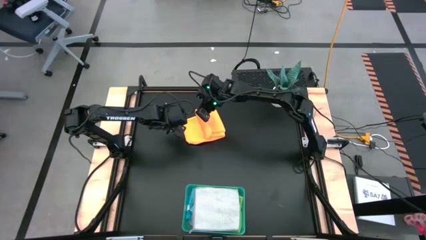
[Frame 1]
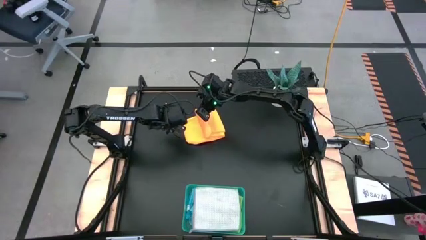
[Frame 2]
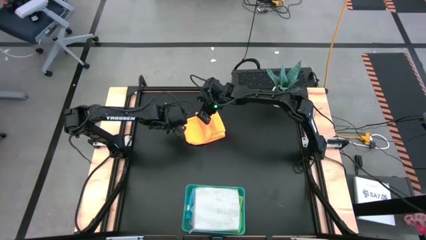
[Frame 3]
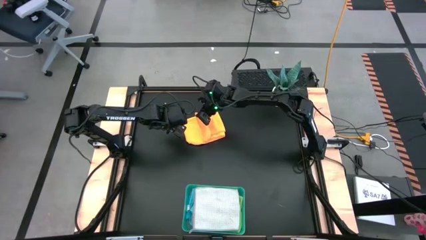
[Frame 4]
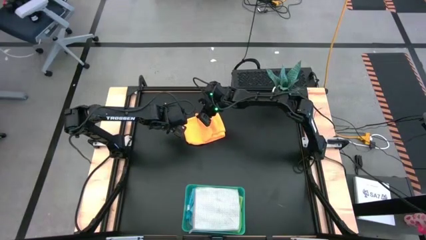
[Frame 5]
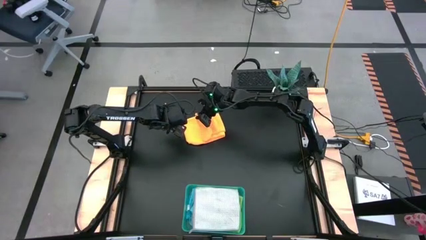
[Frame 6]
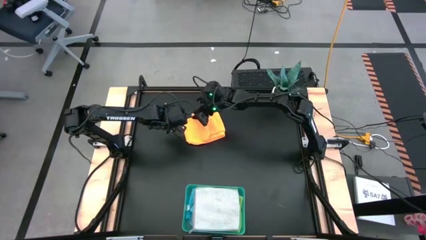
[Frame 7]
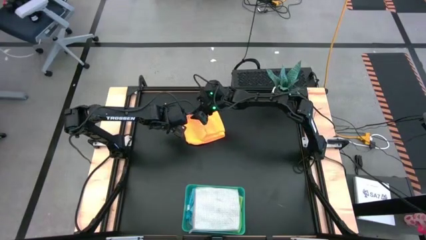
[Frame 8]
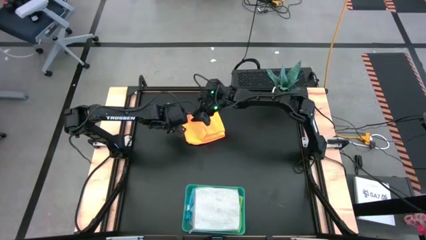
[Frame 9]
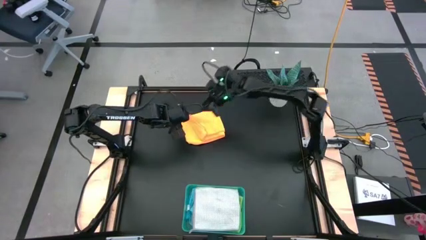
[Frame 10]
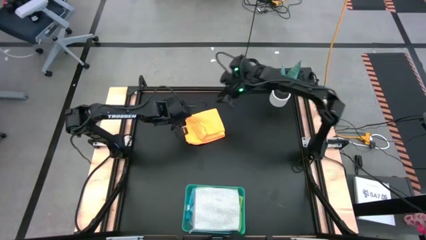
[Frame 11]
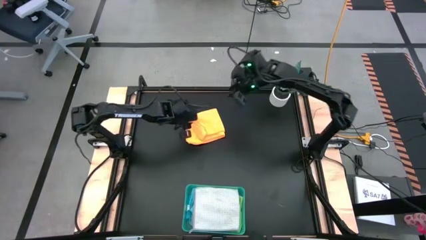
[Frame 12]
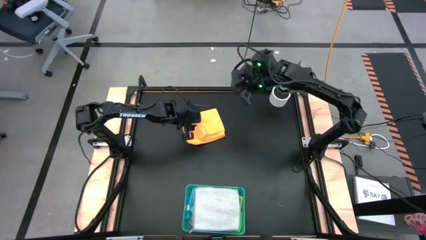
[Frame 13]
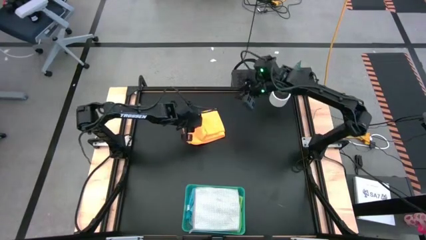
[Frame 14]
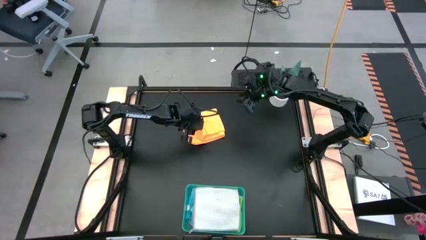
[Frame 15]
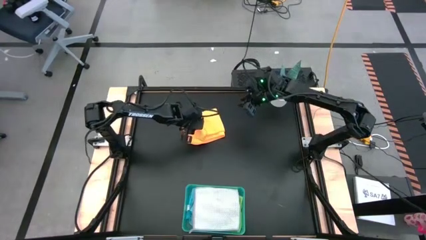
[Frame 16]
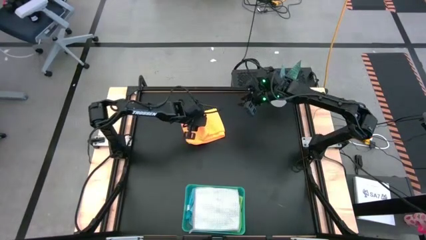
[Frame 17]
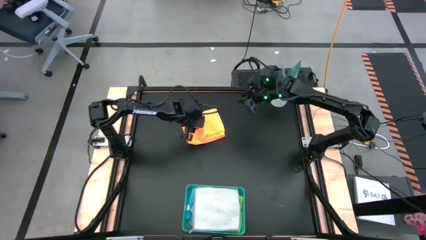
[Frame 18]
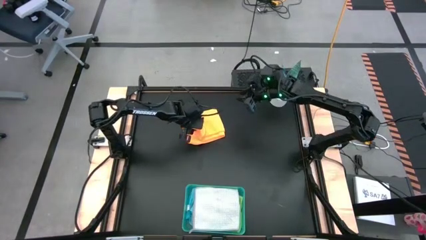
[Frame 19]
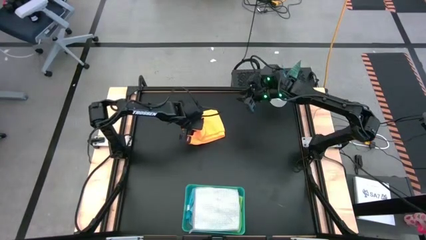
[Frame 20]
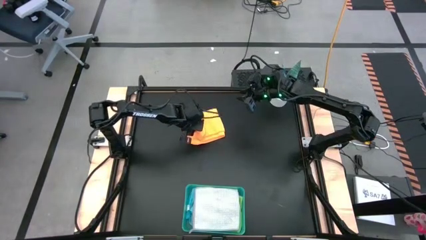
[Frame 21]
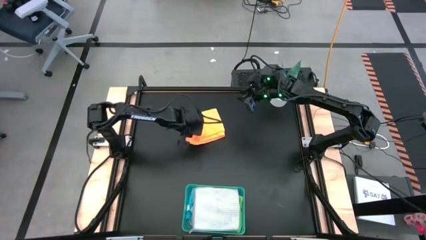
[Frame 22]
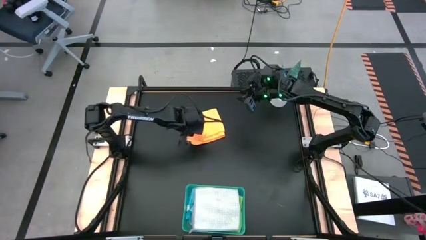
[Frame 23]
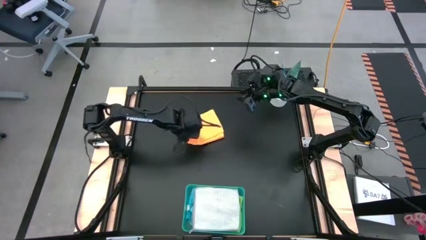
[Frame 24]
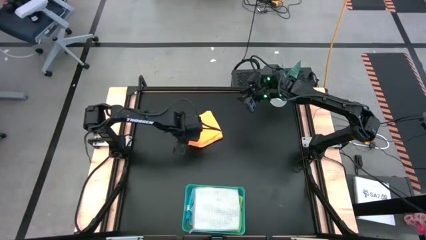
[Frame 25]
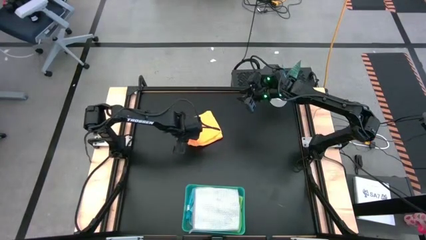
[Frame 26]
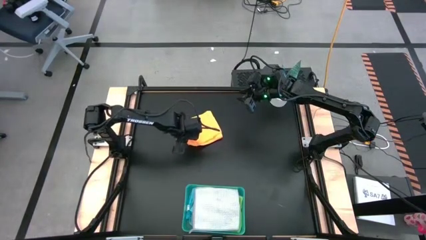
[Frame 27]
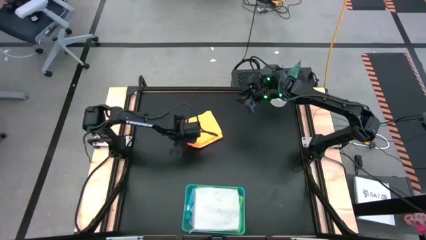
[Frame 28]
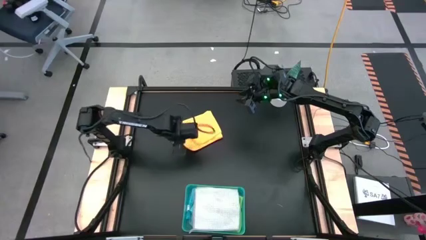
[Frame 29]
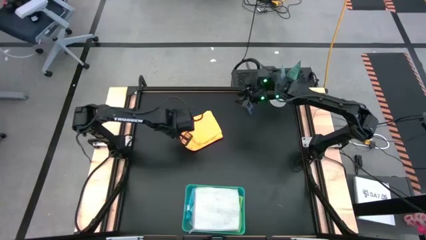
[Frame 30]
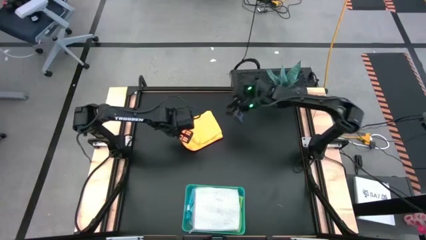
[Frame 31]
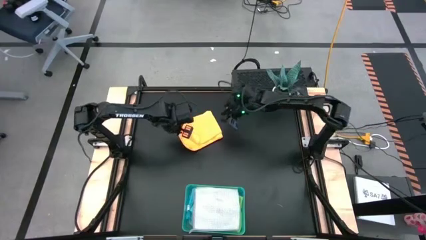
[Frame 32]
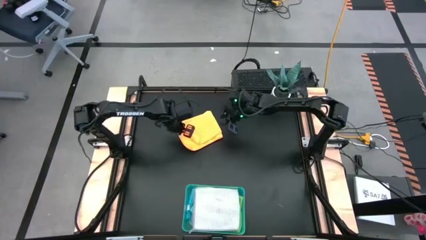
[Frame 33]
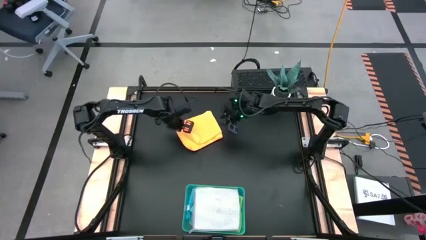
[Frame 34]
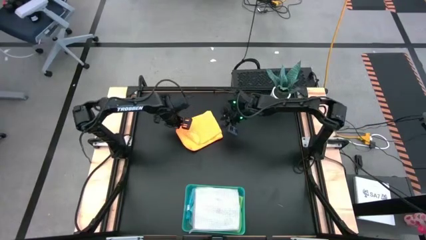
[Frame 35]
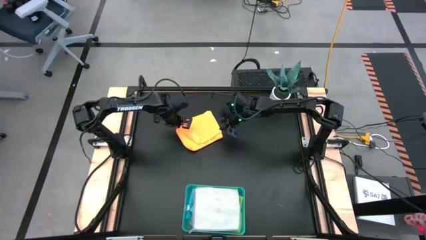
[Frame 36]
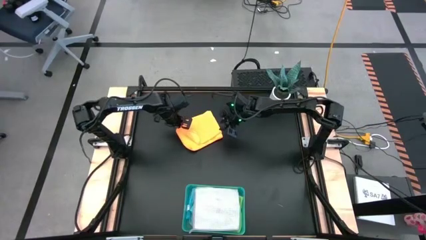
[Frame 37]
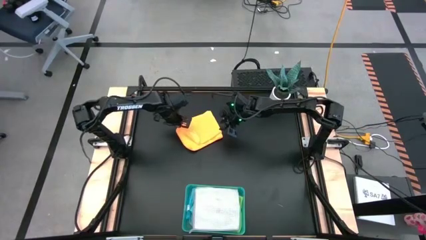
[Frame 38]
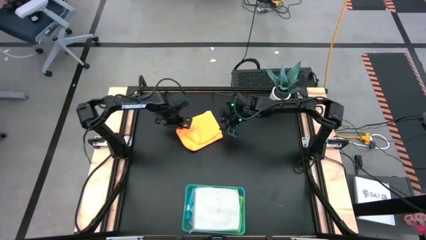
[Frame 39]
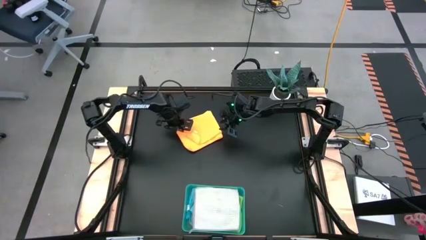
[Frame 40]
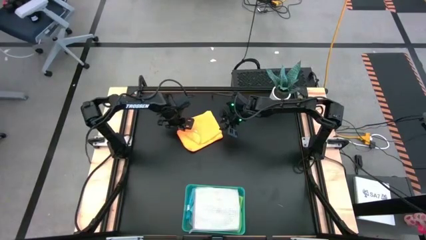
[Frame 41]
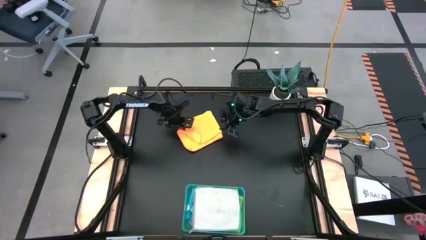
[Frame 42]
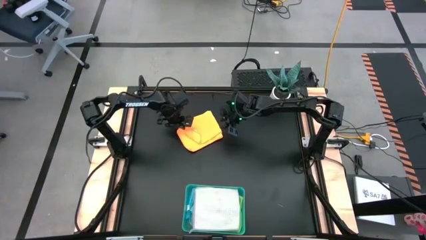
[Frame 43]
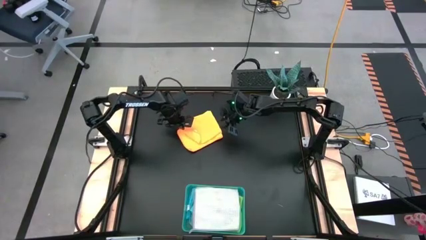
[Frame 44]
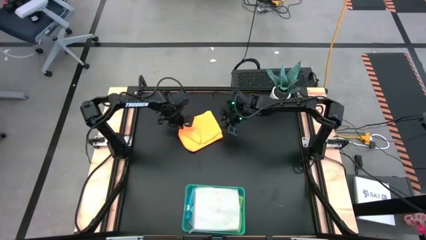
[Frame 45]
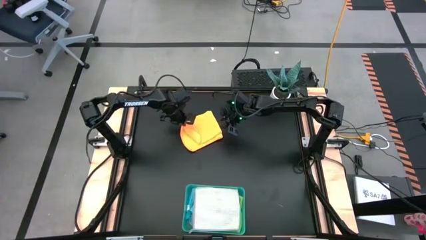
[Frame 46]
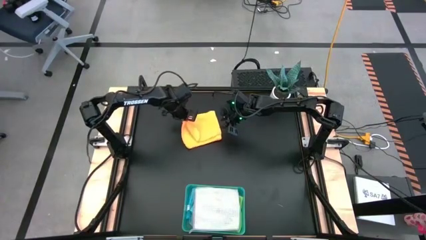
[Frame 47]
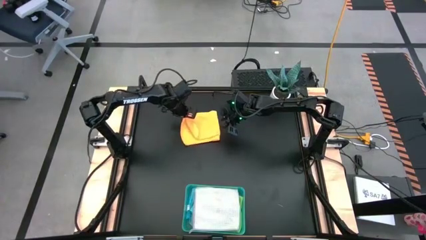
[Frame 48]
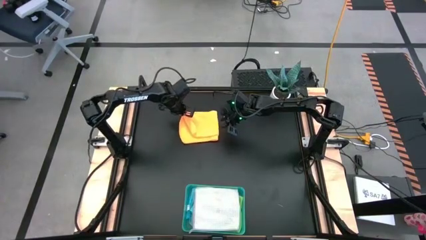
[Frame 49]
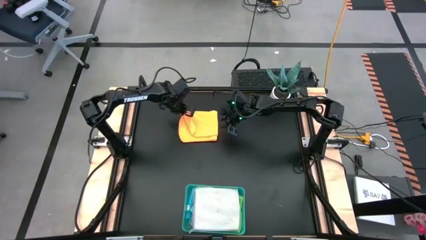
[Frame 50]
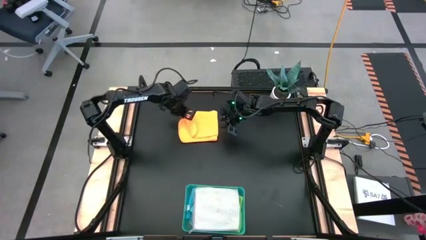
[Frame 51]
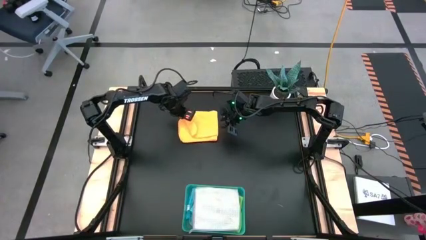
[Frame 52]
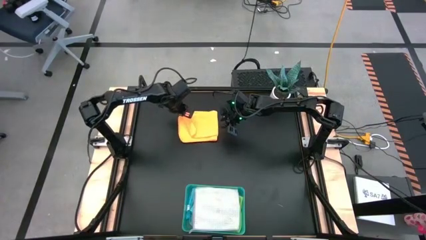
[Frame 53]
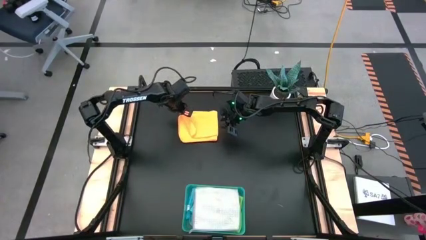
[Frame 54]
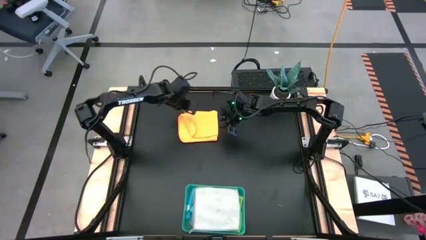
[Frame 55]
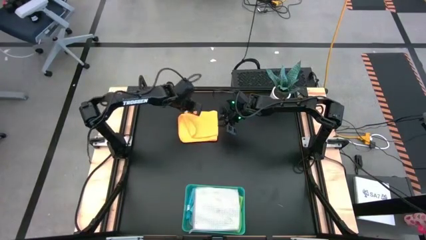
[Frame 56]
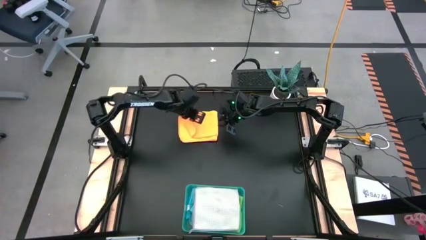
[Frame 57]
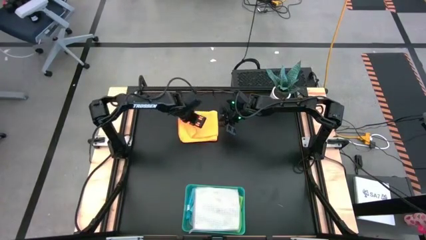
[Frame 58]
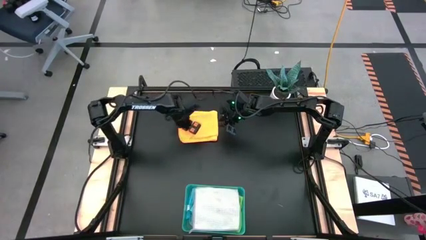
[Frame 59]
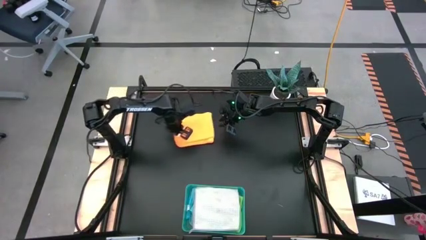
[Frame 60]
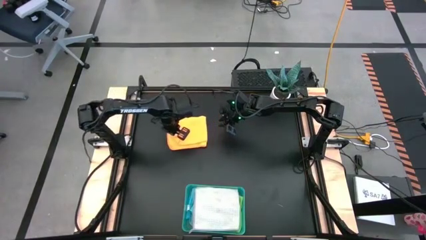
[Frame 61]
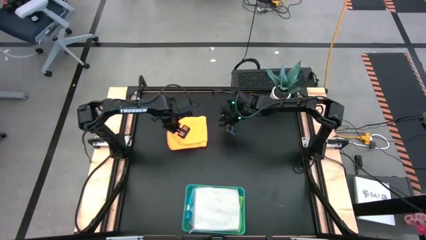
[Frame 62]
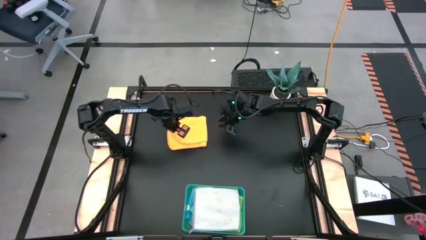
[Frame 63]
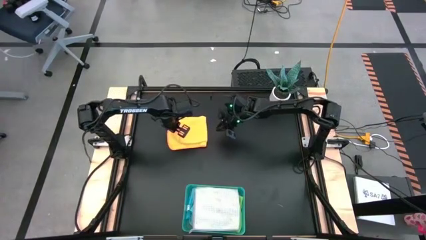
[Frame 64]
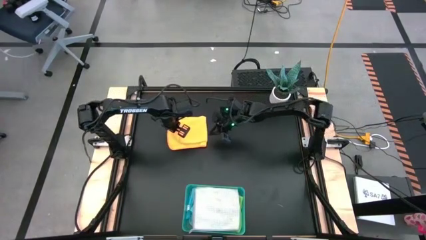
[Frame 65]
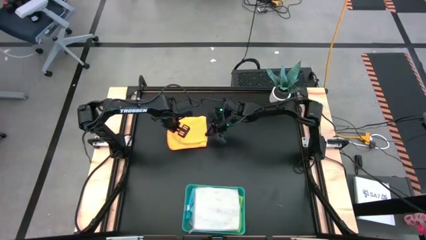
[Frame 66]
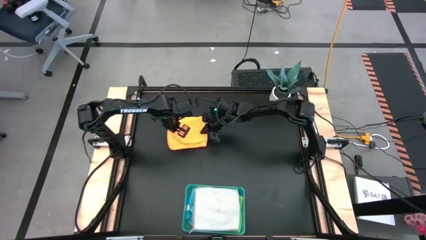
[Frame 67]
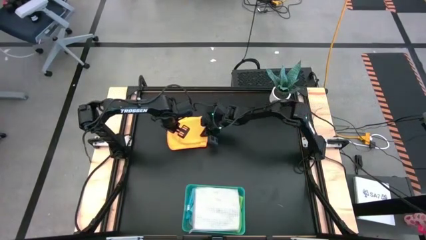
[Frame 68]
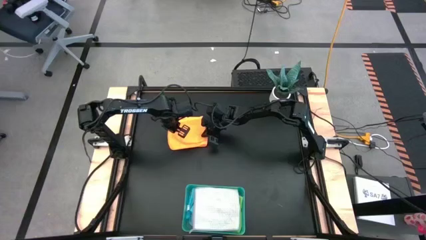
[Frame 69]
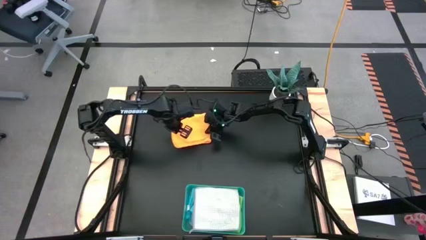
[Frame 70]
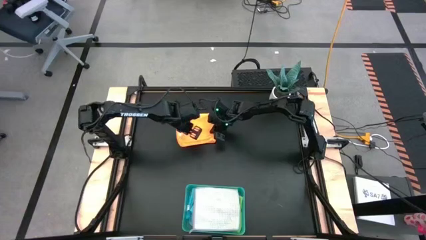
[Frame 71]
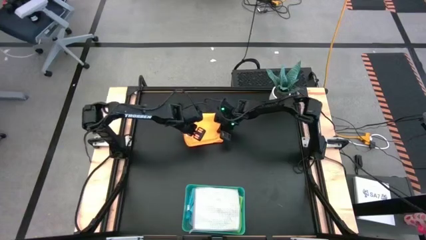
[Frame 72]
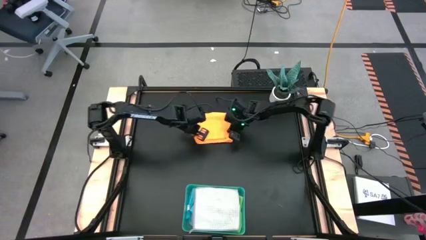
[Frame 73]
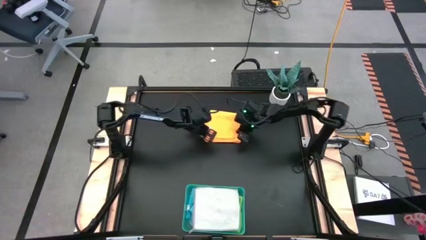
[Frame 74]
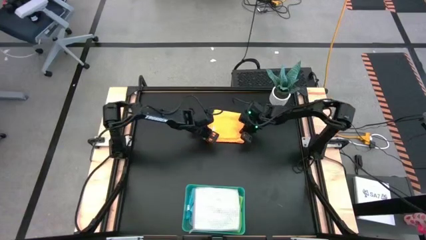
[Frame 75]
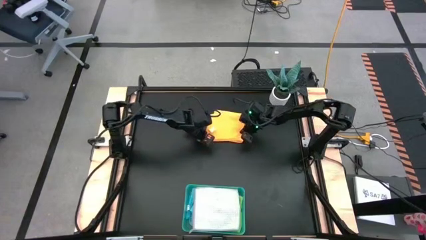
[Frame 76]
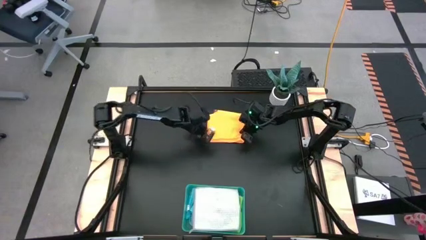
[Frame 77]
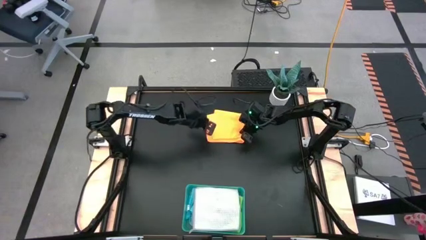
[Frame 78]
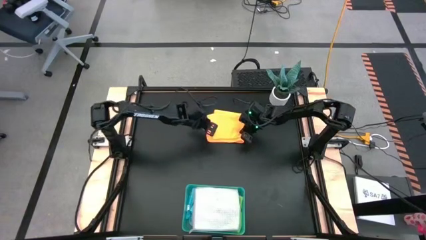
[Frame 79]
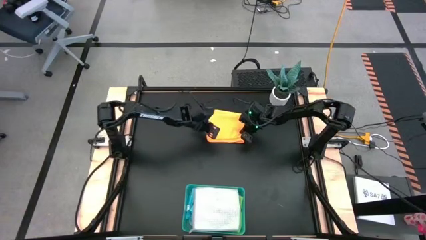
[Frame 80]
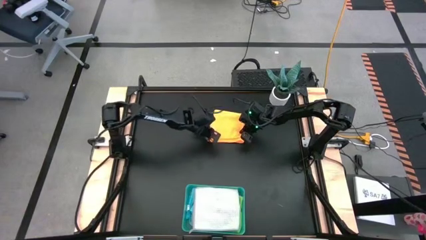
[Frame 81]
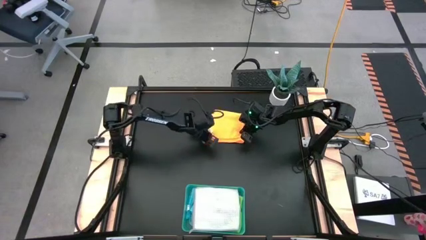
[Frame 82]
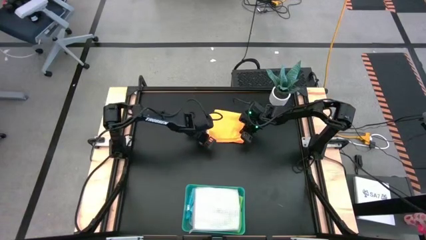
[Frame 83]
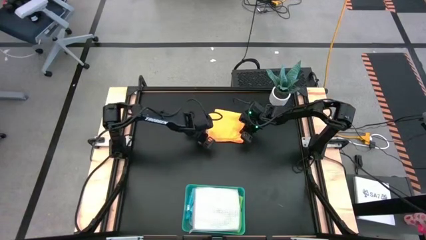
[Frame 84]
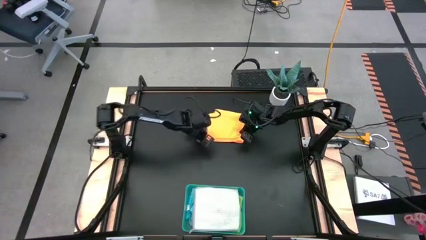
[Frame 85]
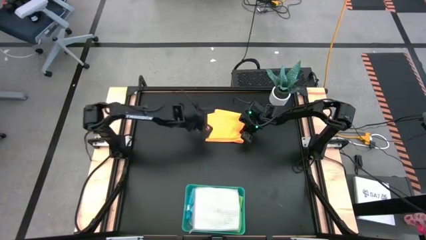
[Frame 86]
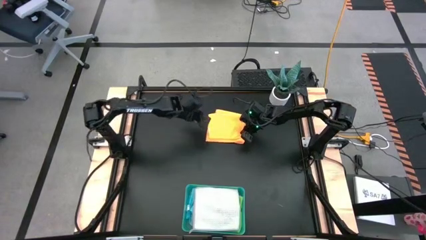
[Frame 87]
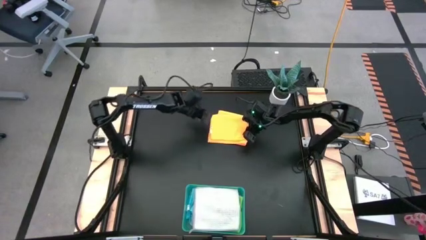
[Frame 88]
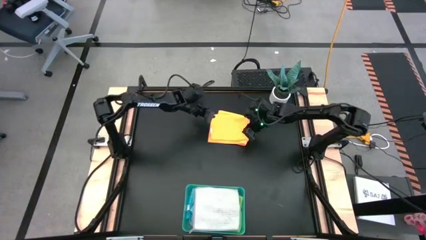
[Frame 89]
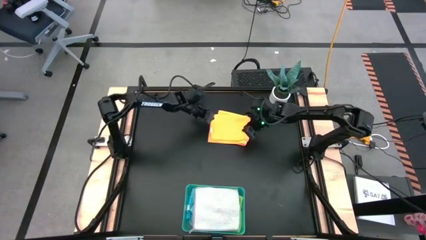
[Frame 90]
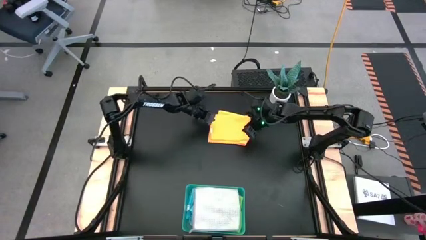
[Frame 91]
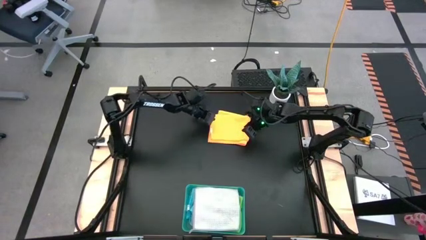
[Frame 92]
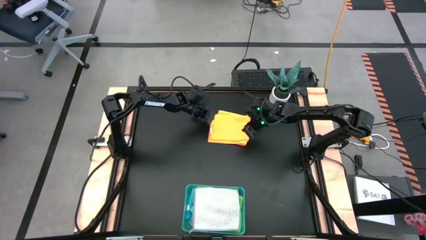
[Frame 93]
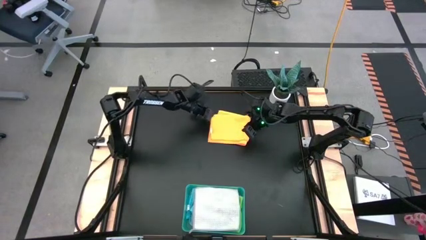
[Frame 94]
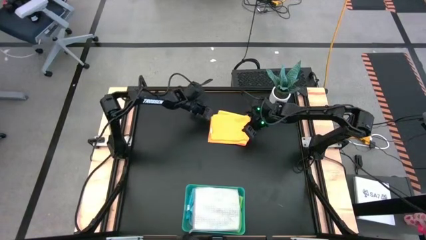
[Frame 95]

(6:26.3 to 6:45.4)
Task: Fold microfiber towels
Fold the orange microfiber cloth
